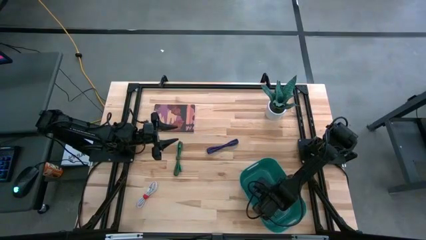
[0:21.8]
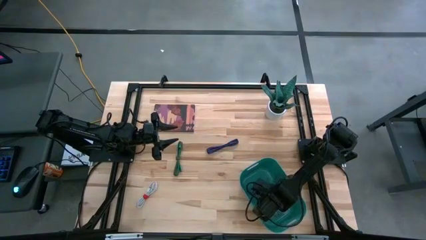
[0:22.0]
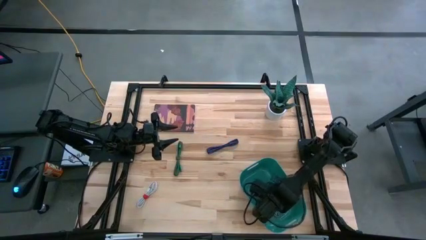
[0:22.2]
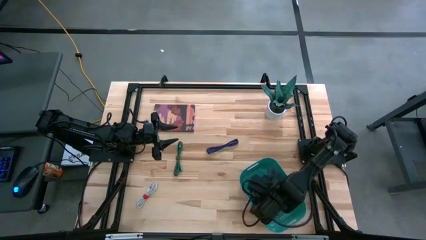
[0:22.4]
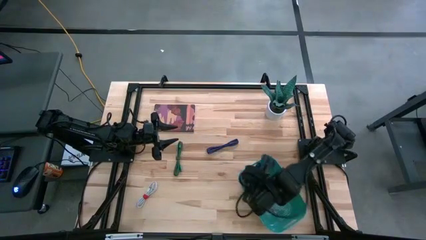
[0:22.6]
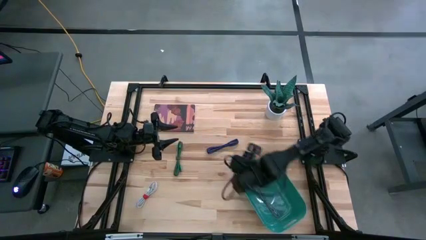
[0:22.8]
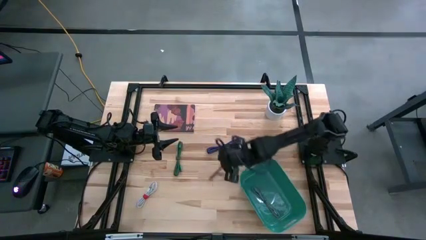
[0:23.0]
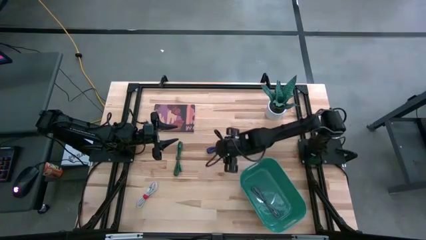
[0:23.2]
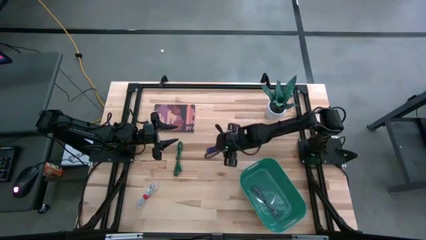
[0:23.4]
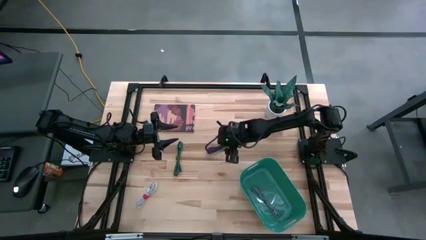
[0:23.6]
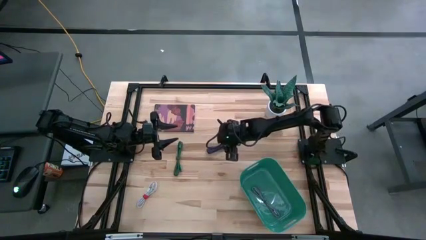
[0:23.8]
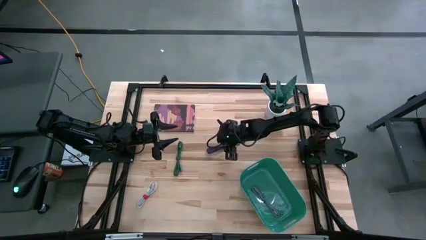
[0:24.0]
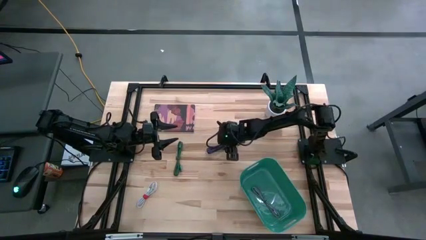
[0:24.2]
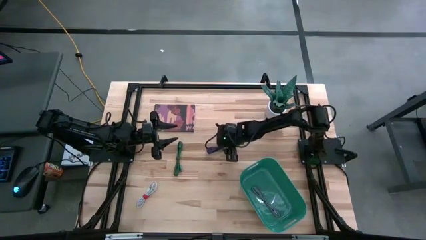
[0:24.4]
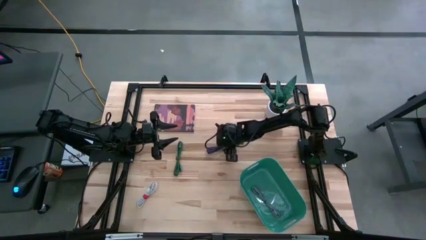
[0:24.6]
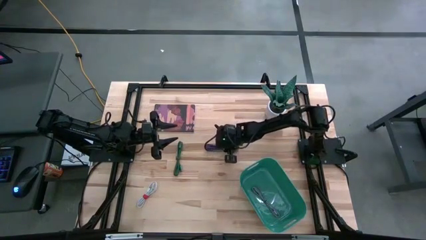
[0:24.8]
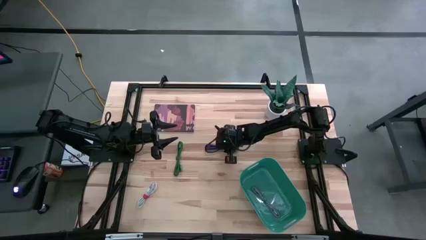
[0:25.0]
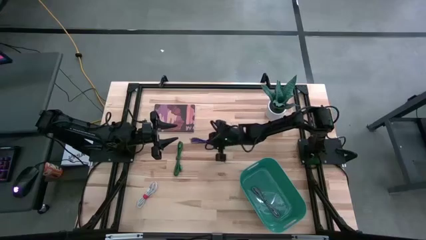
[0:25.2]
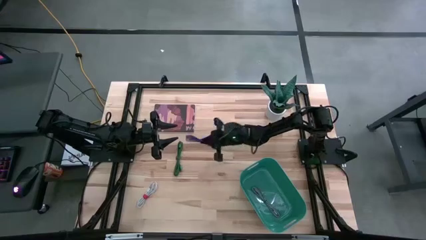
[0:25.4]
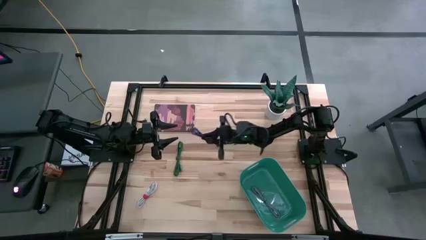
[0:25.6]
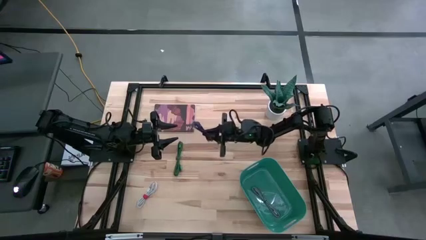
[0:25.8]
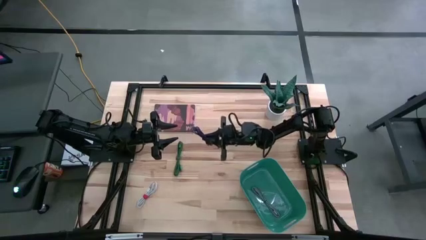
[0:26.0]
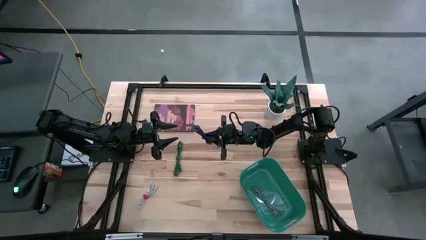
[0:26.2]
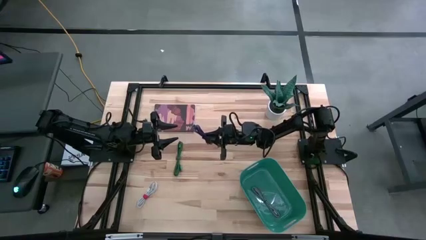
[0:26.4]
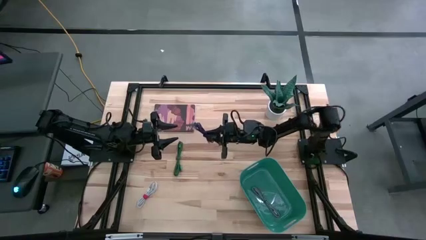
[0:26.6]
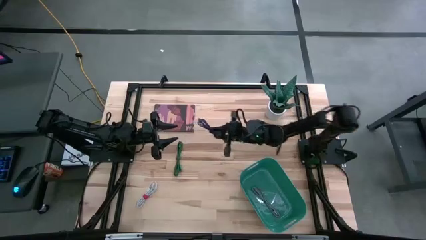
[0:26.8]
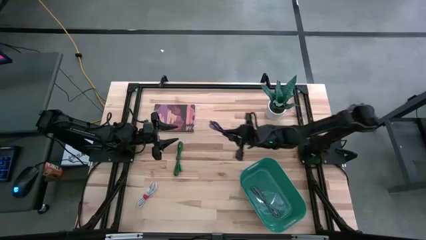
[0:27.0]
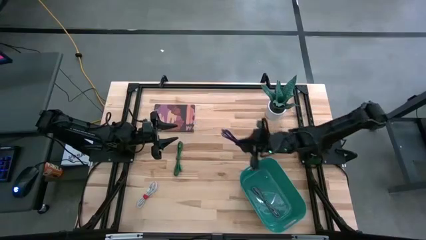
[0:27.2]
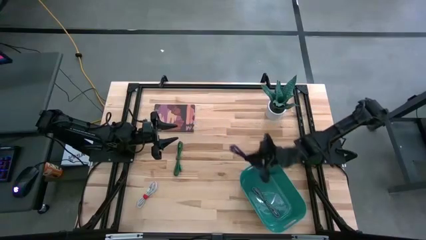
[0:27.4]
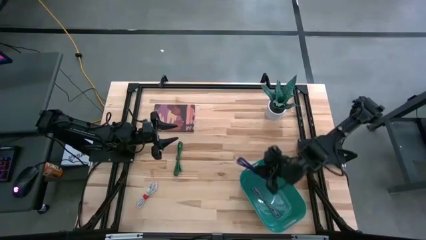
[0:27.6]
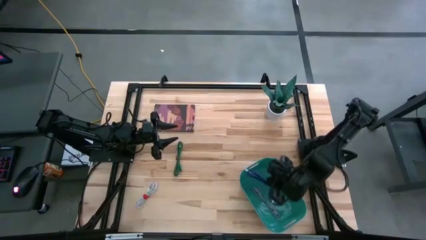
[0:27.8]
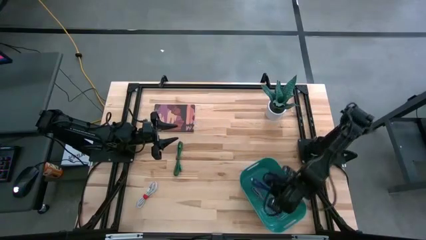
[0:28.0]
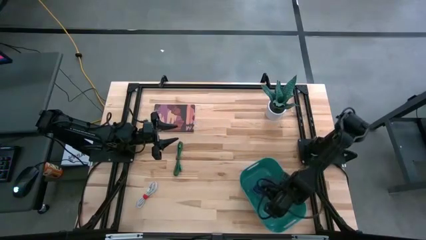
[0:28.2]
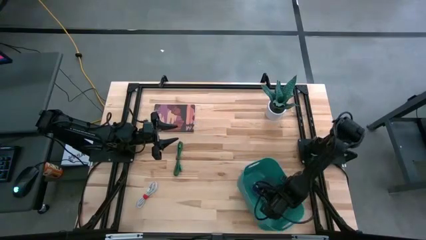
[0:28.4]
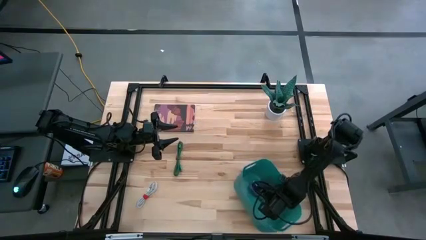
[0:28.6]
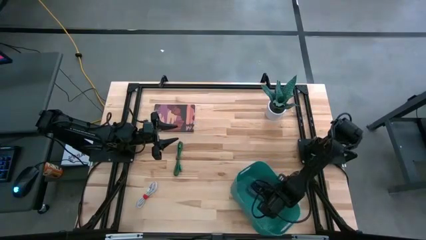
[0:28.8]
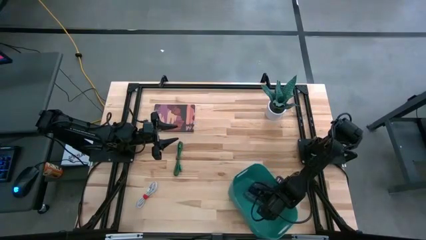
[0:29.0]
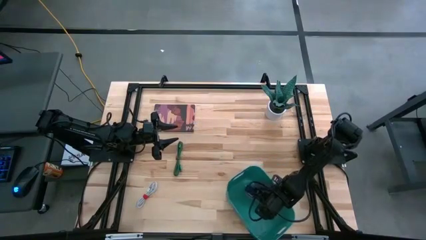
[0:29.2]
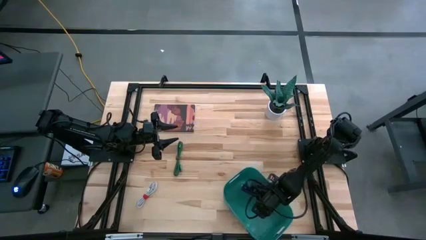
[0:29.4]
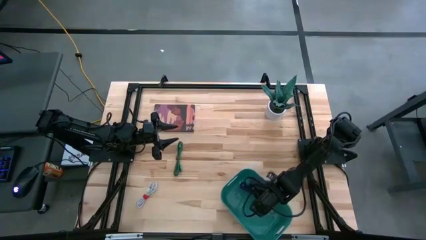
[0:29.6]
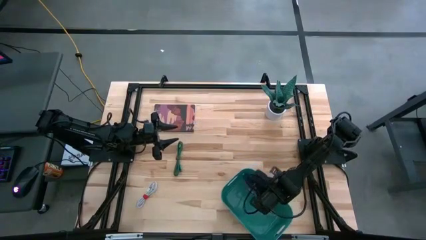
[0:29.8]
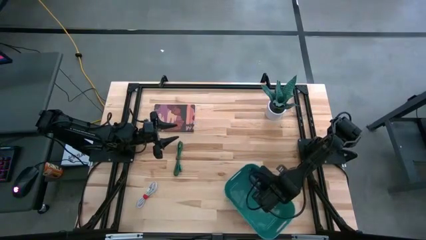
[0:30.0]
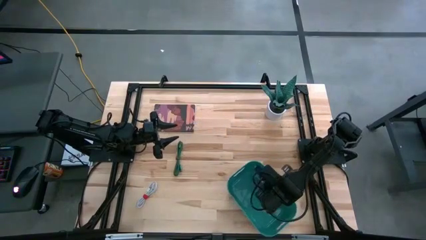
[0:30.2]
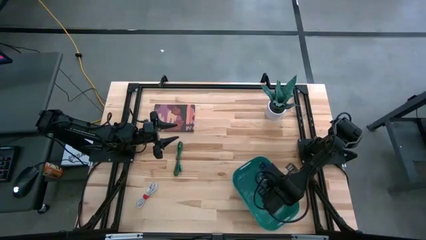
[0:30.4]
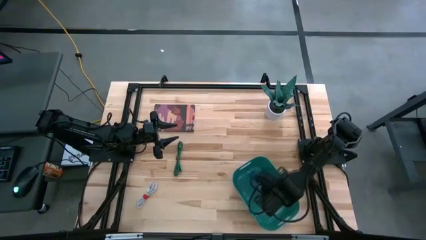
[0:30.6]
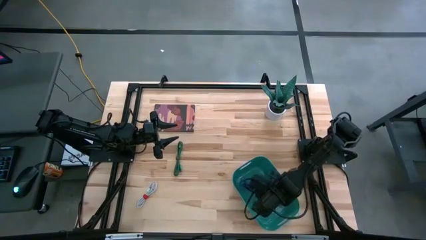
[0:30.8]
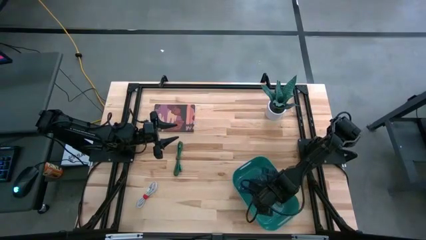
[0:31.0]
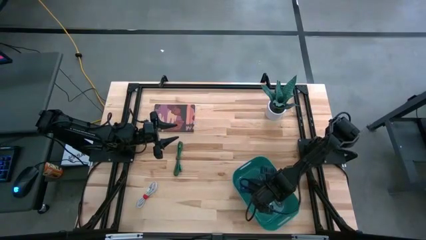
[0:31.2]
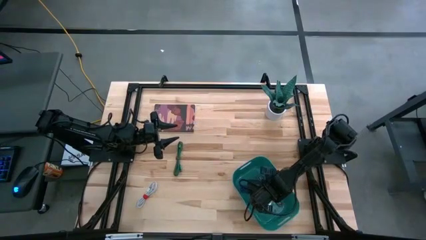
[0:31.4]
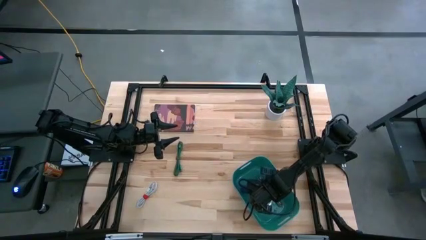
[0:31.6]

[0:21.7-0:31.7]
Task: Pick and place USB-C Cables
Put the violet USB cable into the green bin
